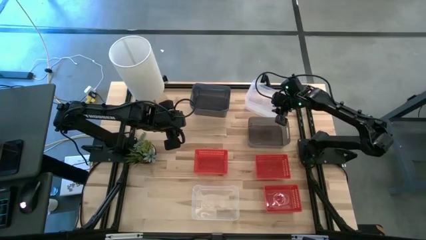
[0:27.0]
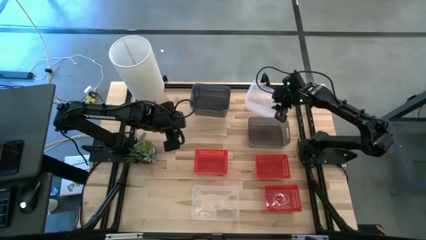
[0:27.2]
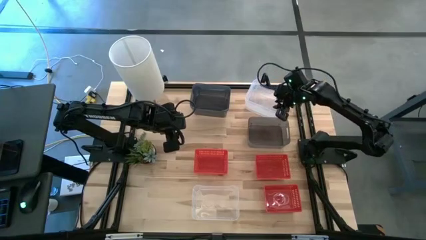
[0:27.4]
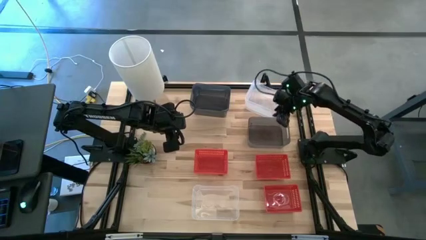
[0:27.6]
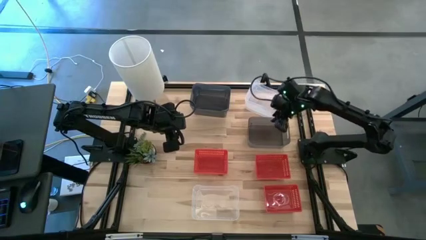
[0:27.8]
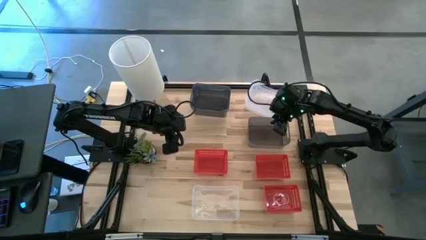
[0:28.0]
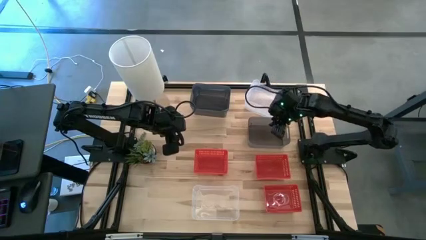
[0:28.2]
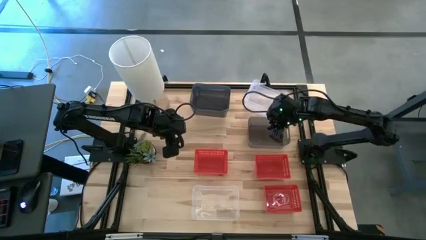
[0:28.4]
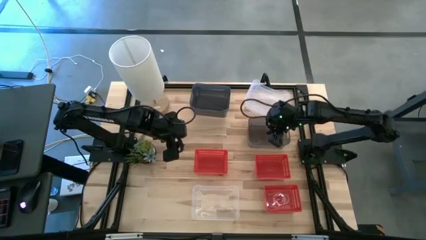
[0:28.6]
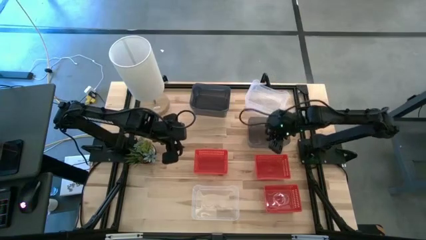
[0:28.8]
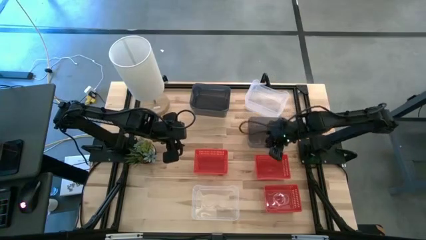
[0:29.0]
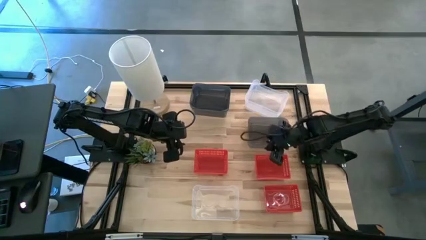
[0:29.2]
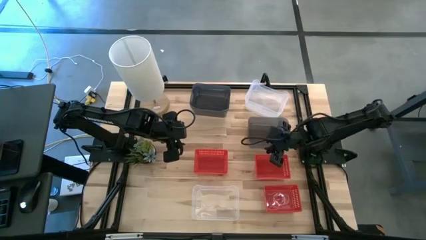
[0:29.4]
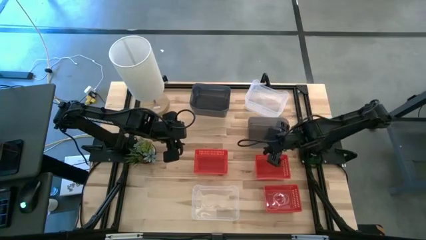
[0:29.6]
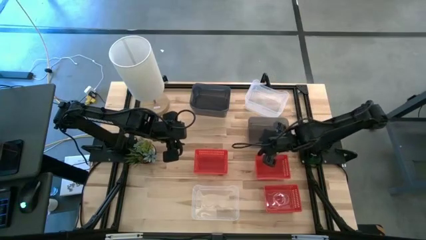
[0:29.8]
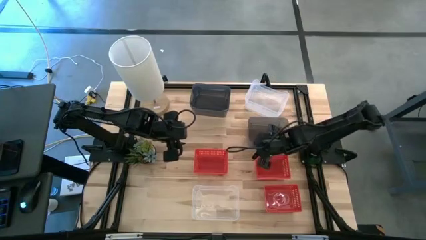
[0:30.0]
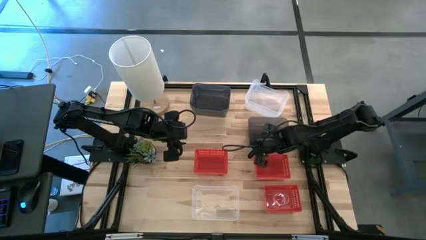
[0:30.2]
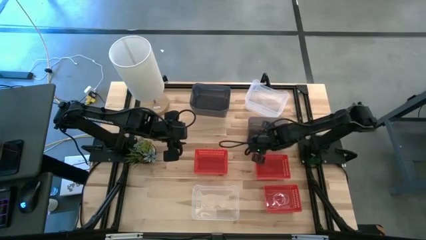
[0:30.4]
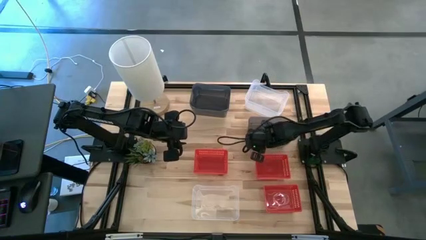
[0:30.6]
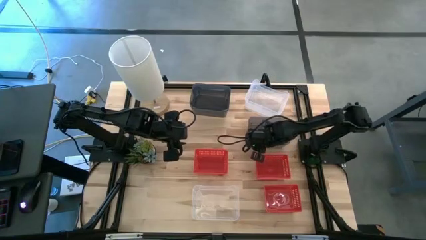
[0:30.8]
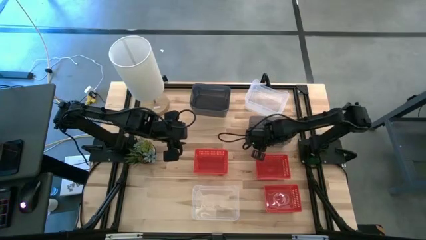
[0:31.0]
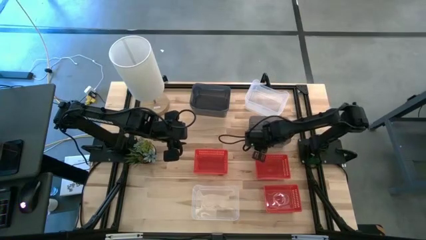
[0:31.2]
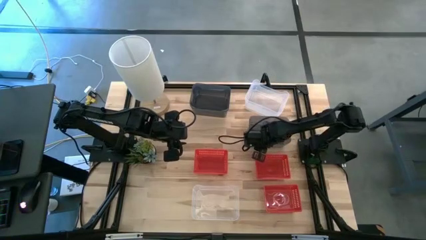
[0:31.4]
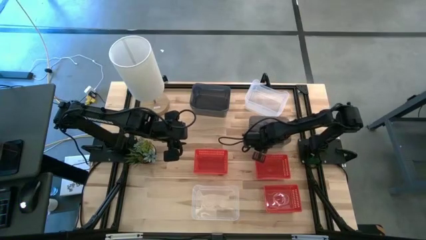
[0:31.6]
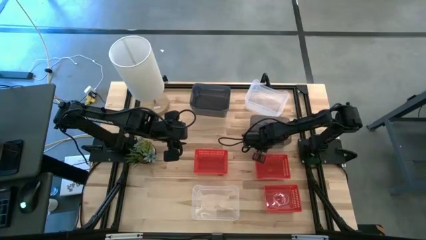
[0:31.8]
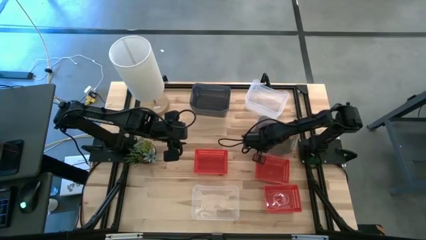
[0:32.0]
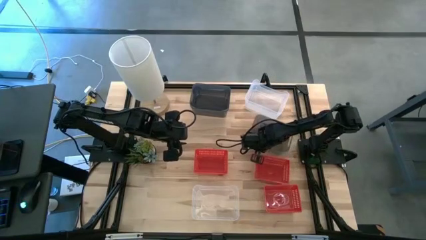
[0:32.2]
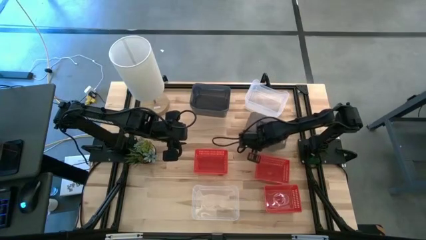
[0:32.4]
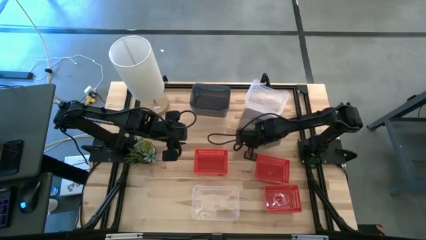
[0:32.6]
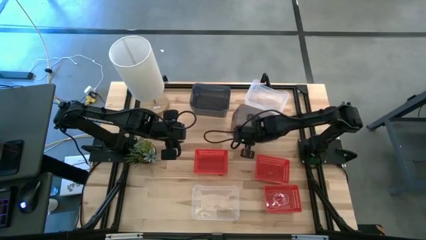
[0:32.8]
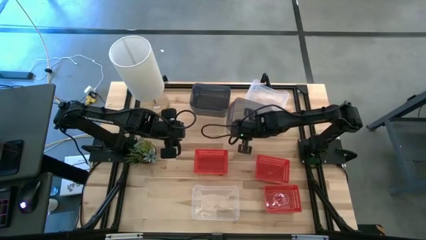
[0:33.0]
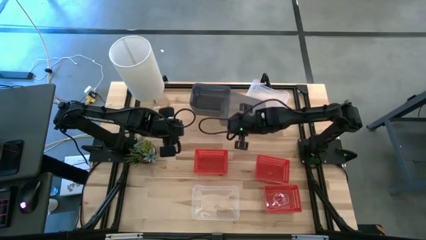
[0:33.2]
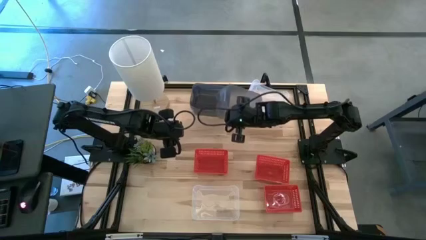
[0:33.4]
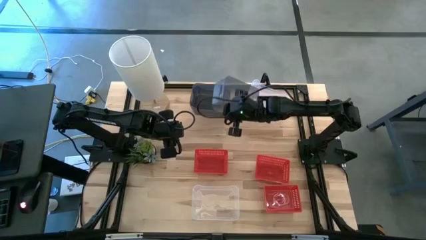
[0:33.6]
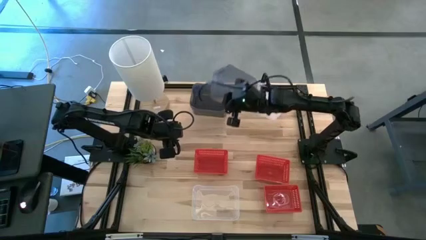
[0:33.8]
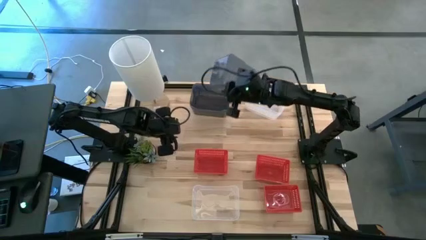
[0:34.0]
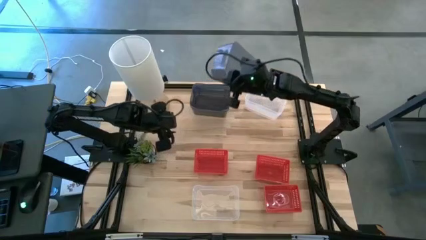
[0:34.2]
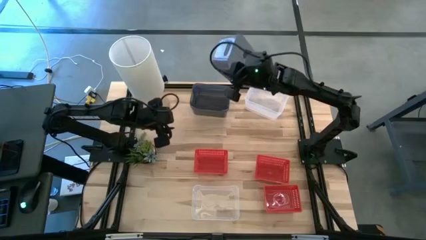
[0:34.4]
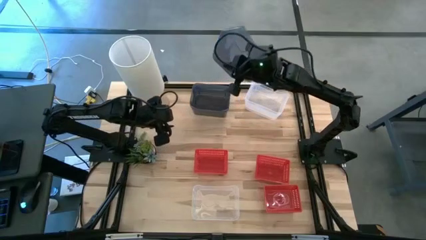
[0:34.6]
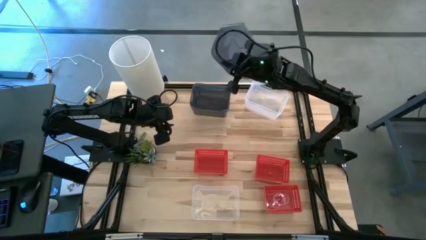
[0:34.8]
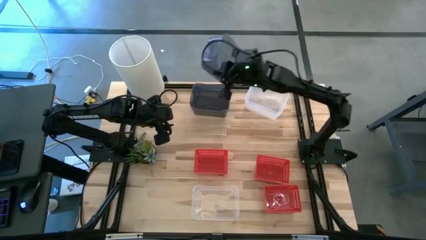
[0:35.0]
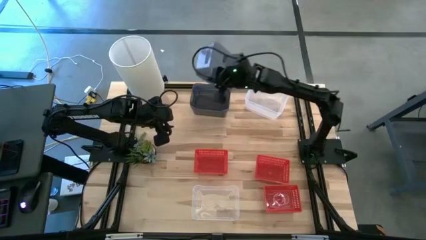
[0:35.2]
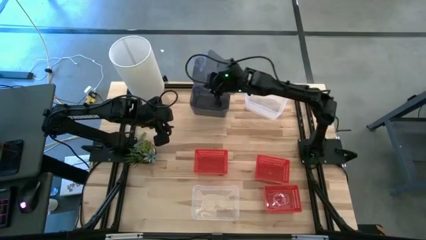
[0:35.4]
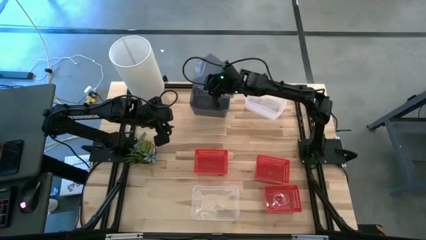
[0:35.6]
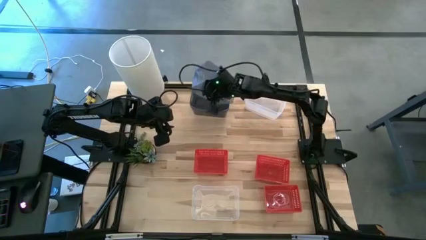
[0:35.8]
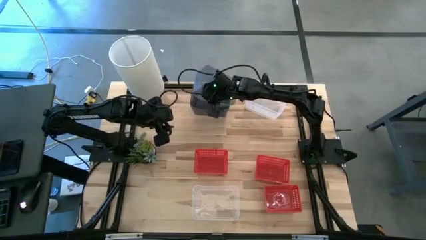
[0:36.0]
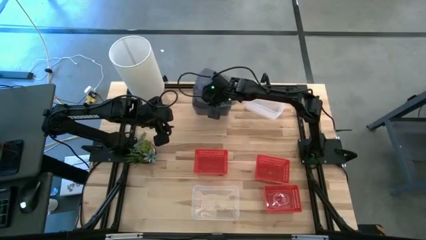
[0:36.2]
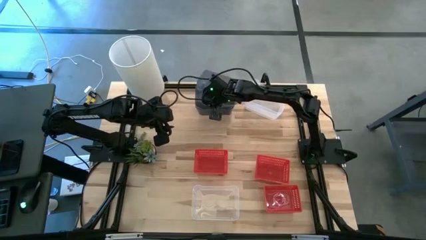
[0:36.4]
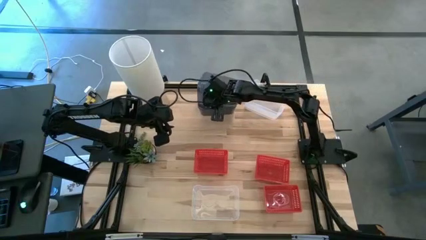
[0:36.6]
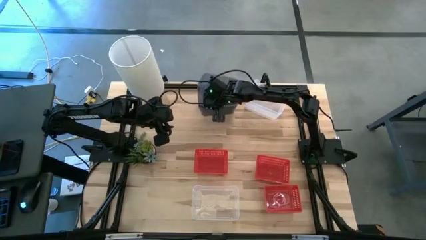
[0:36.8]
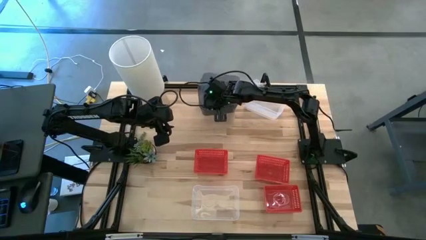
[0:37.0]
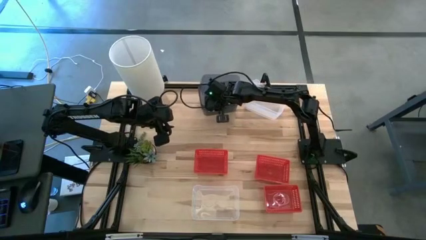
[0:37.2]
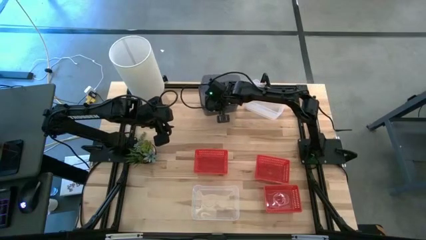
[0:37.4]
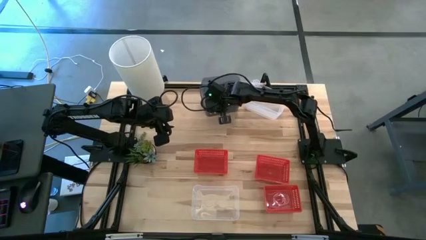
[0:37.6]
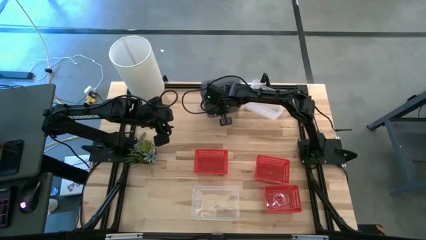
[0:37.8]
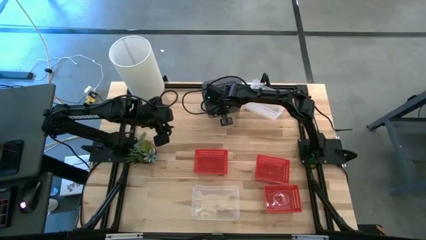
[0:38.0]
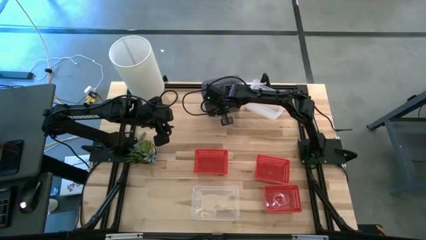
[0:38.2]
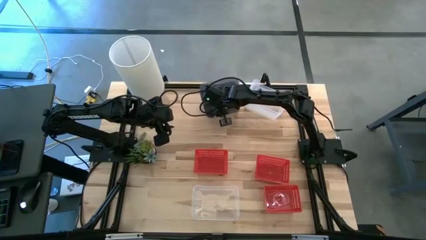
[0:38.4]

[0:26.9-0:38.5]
Stack the right black bin on the stacked black bins
